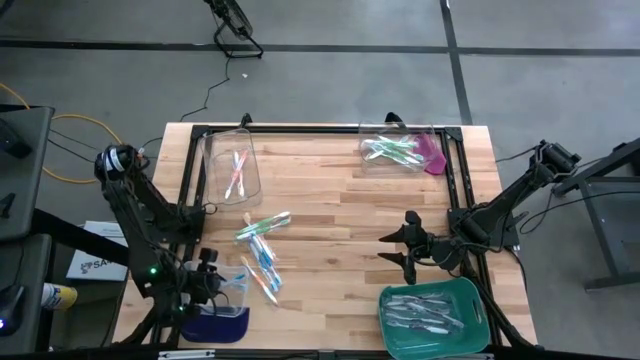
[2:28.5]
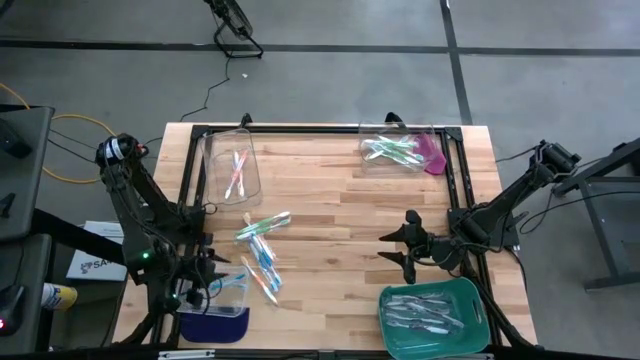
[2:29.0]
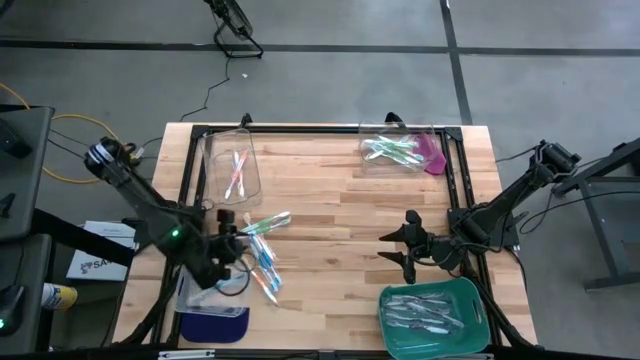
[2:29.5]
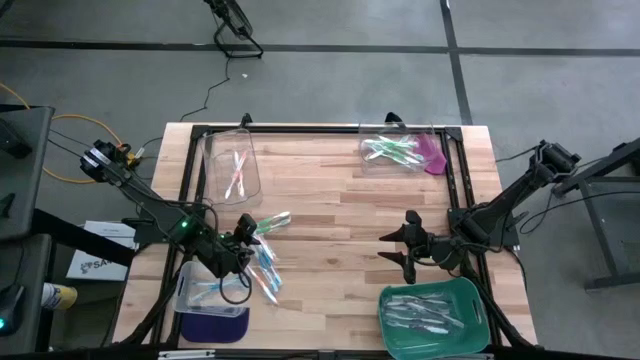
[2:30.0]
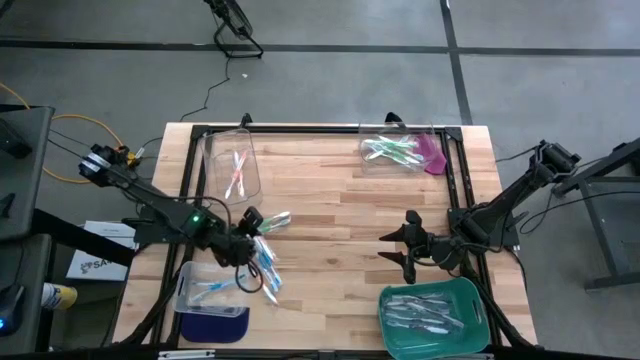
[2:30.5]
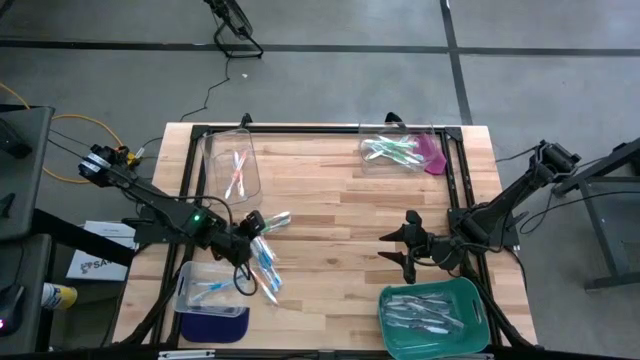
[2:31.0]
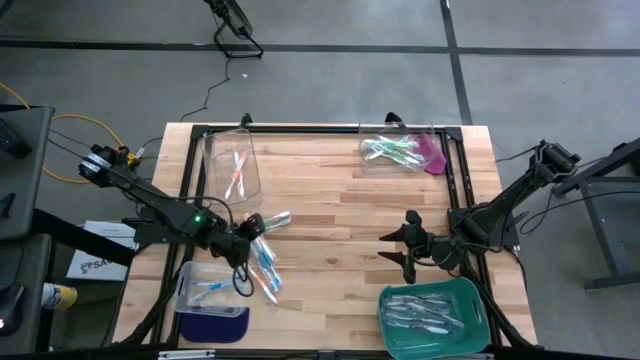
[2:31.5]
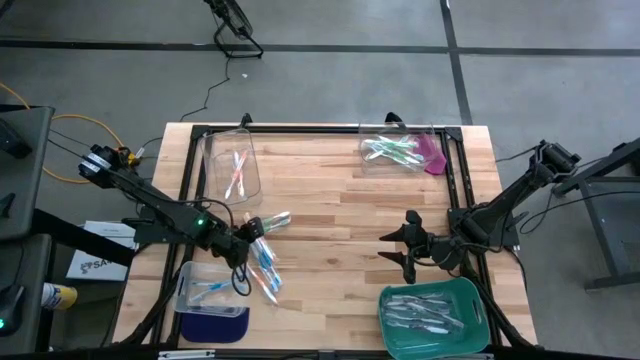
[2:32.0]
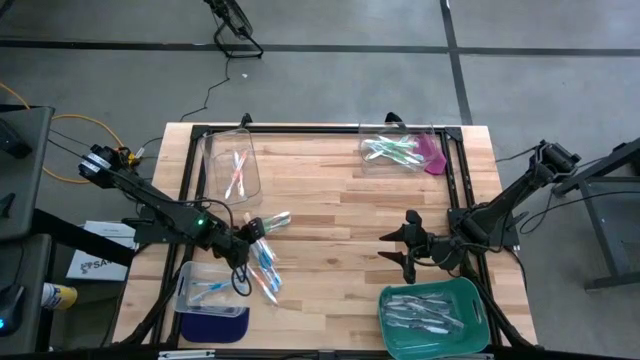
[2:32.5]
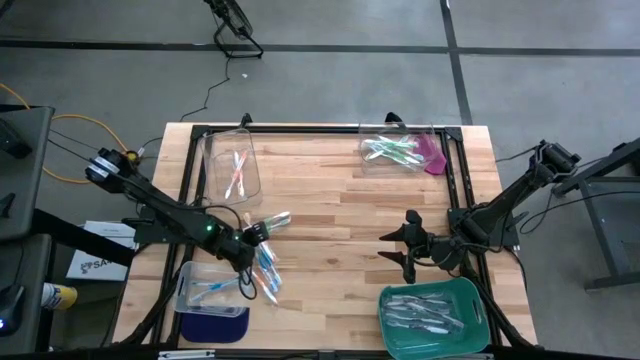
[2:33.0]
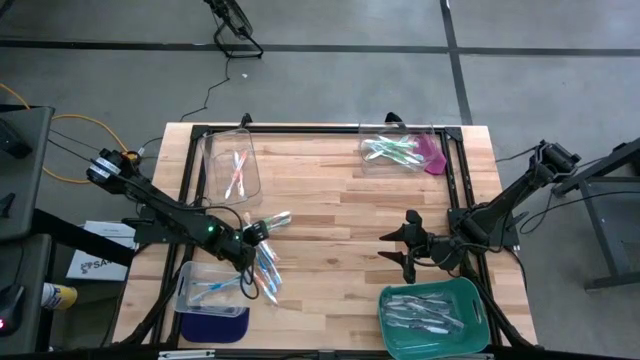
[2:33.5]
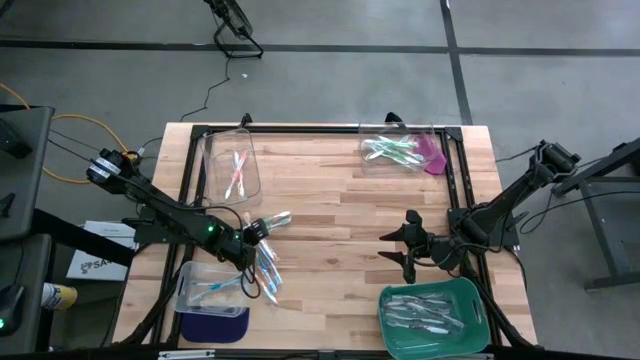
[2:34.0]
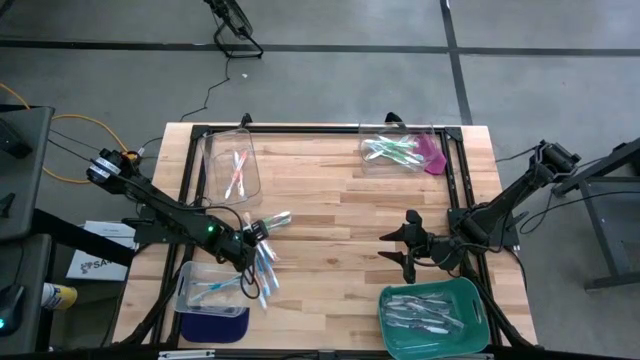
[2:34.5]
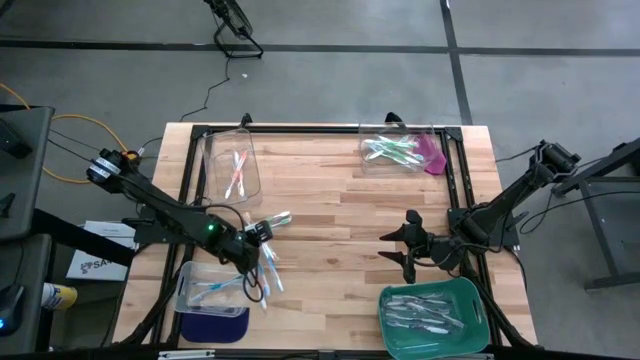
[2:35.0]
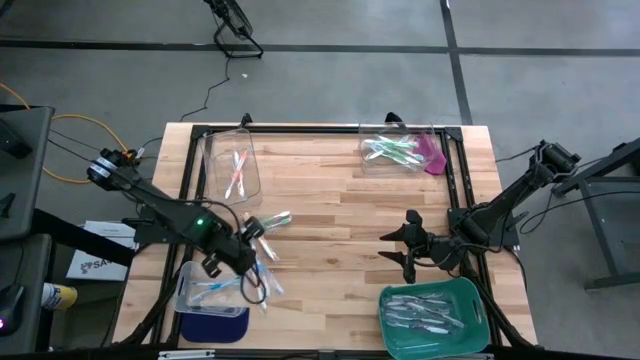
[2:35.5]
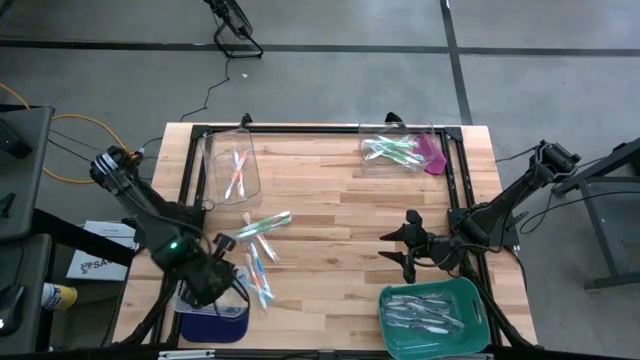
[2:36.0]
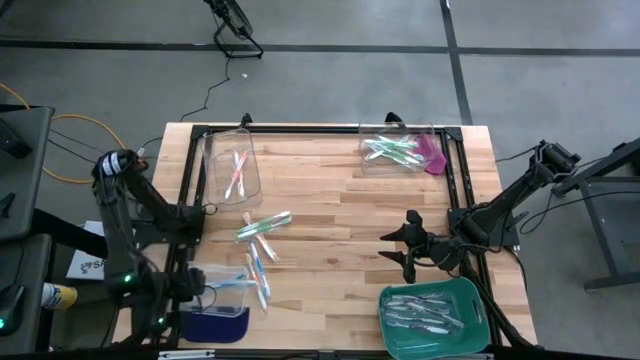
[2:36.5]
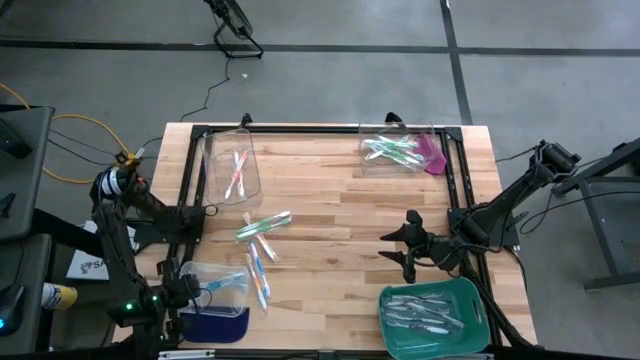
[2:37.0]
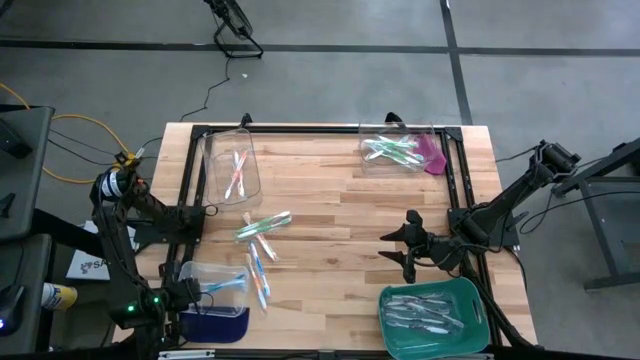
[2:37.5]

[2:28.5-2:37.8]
Task: Pick & Place Toothbrushes
Put the blue toothbrush into the bottom transparent bin

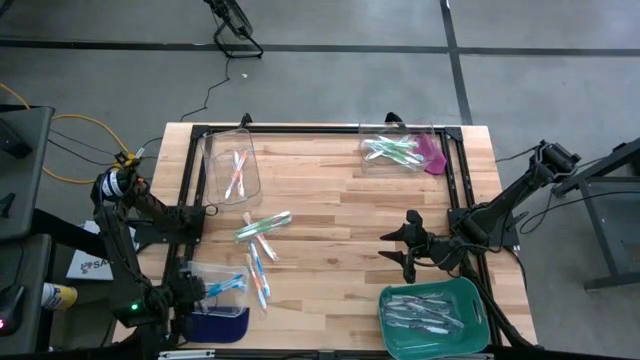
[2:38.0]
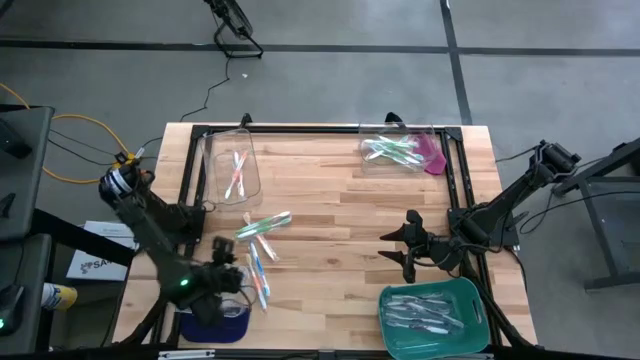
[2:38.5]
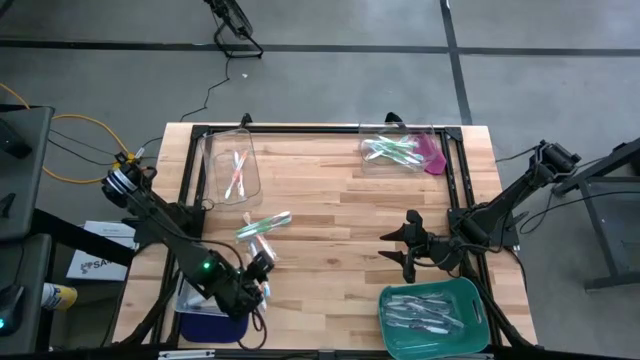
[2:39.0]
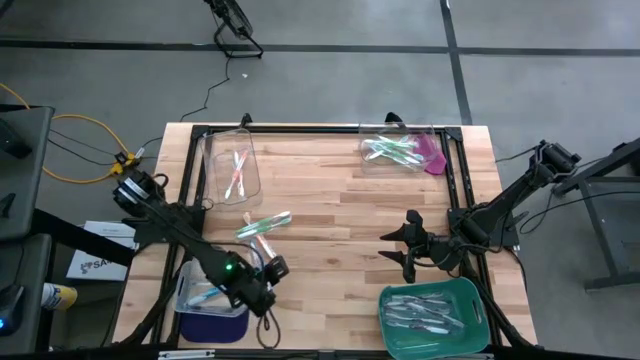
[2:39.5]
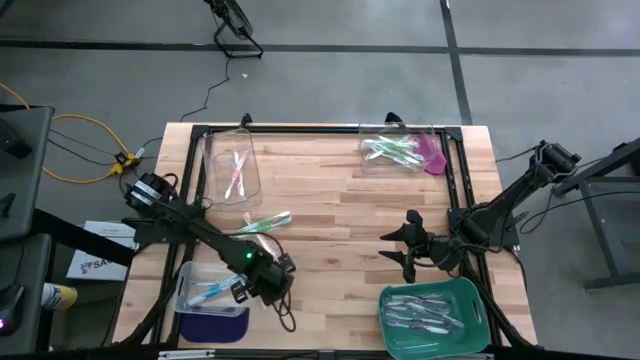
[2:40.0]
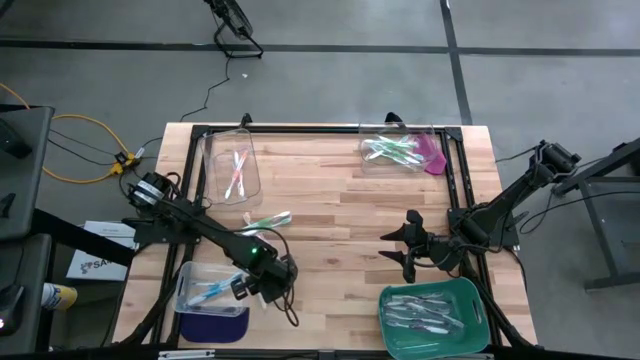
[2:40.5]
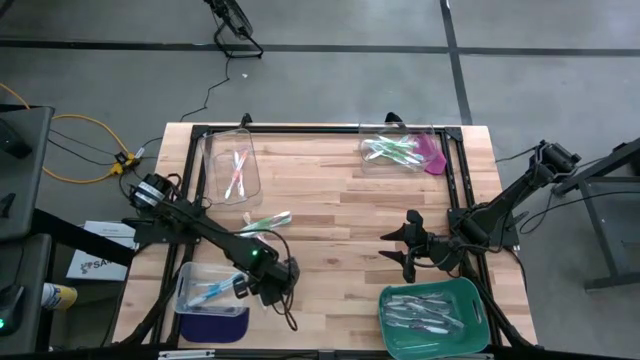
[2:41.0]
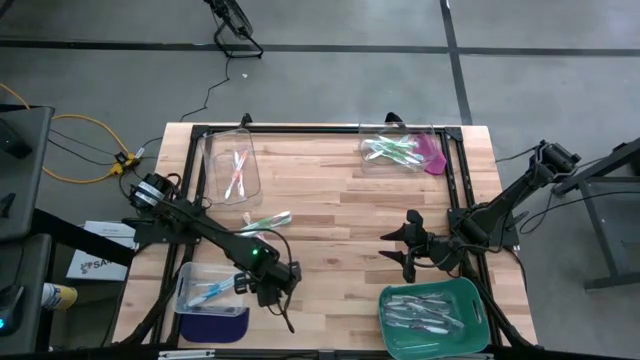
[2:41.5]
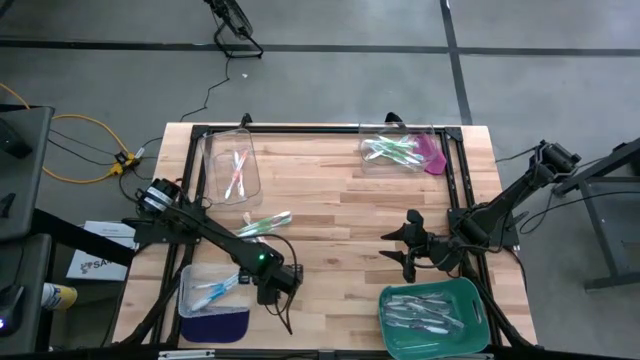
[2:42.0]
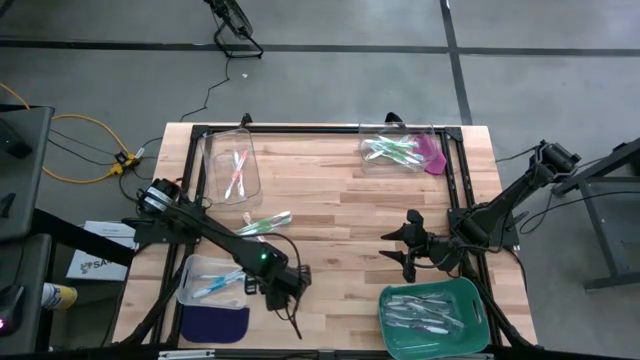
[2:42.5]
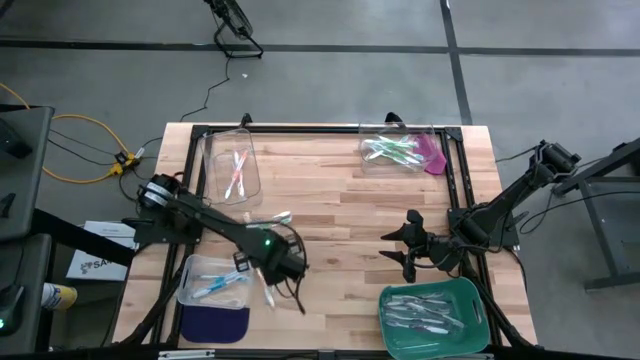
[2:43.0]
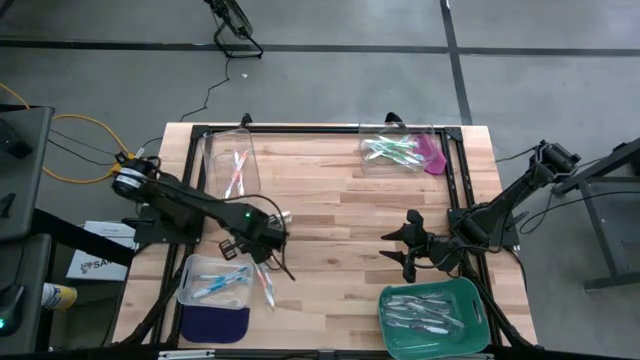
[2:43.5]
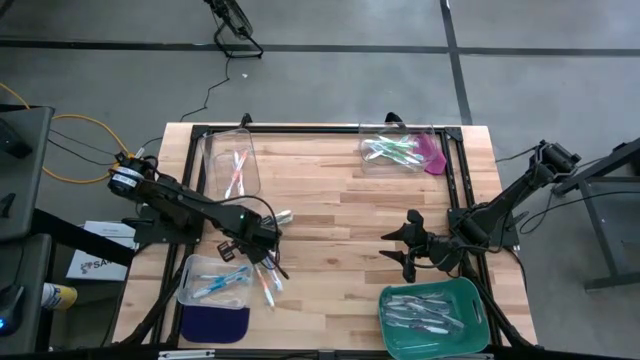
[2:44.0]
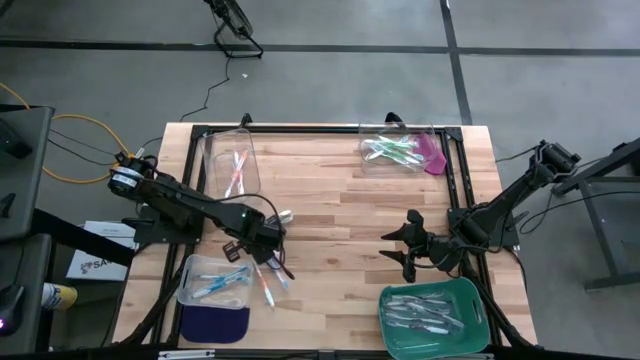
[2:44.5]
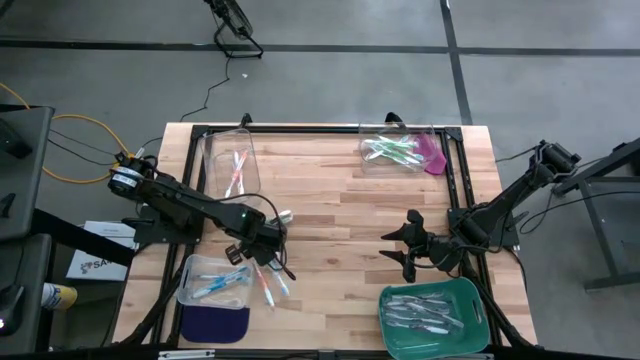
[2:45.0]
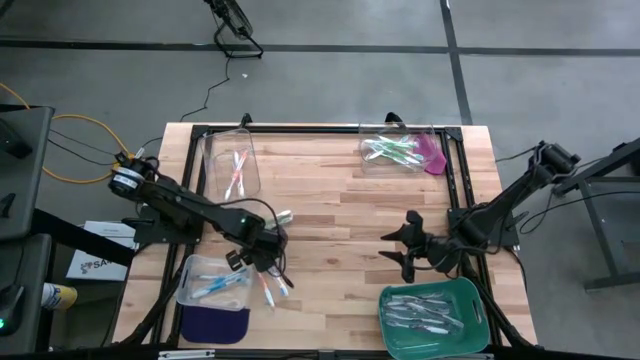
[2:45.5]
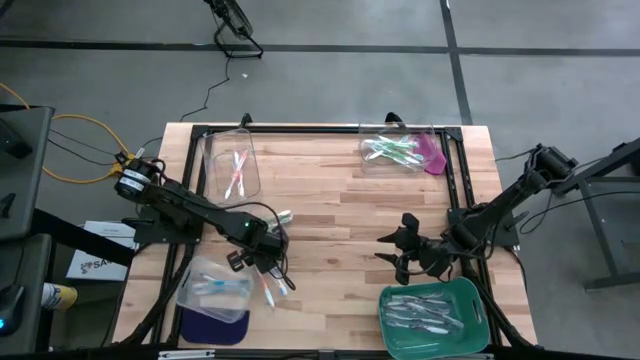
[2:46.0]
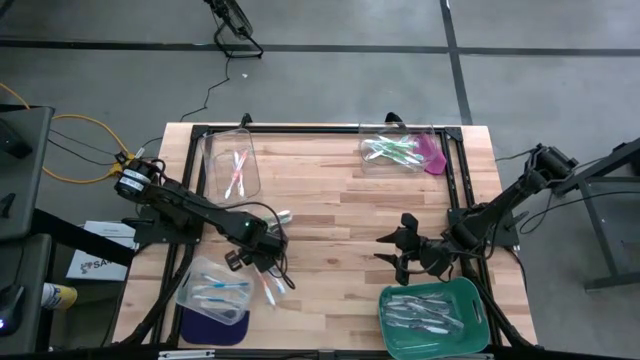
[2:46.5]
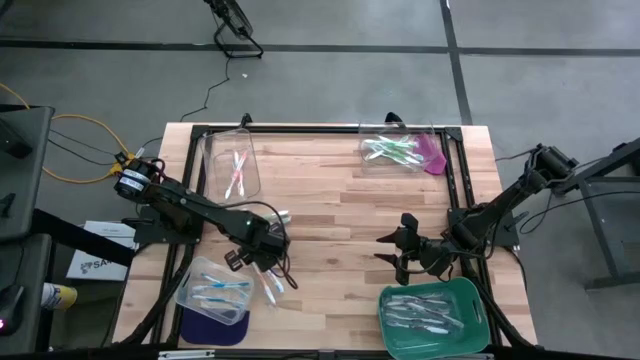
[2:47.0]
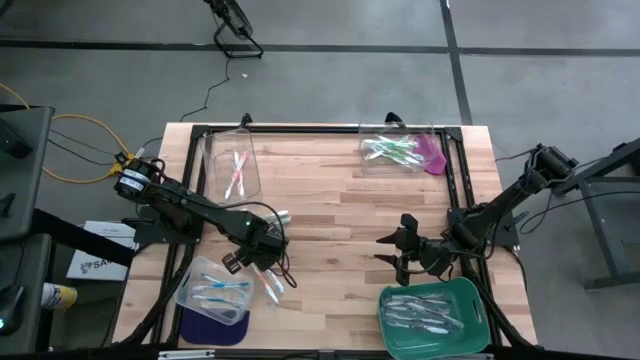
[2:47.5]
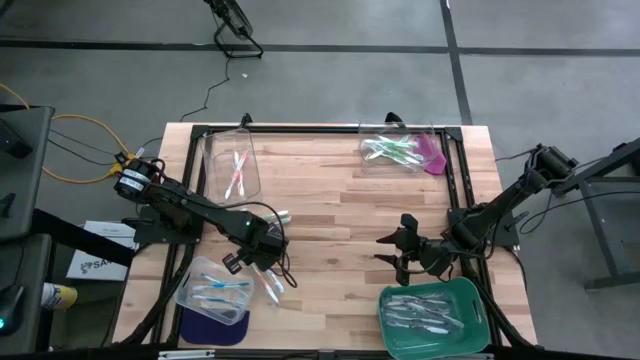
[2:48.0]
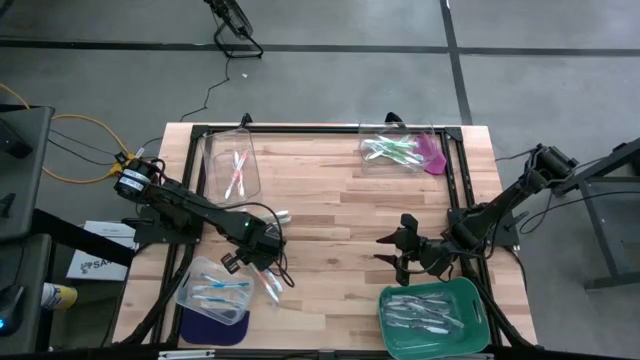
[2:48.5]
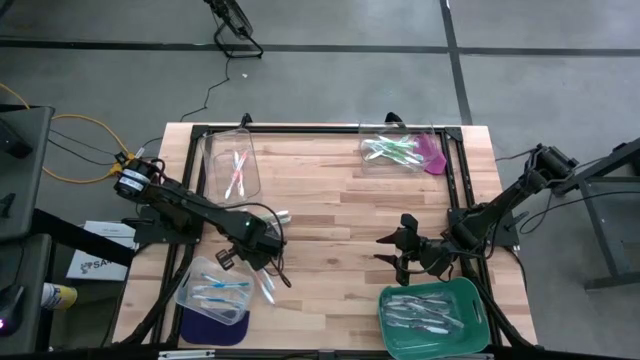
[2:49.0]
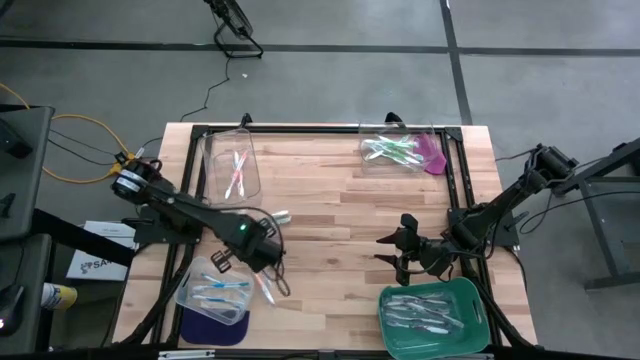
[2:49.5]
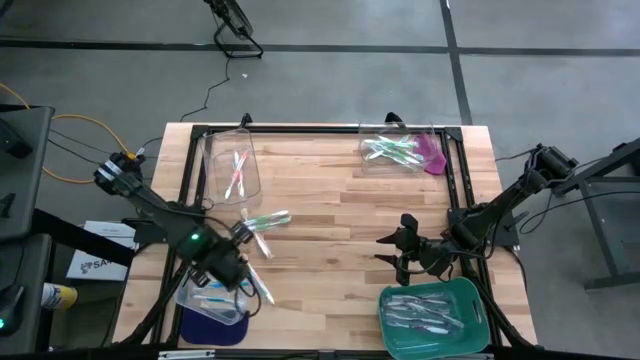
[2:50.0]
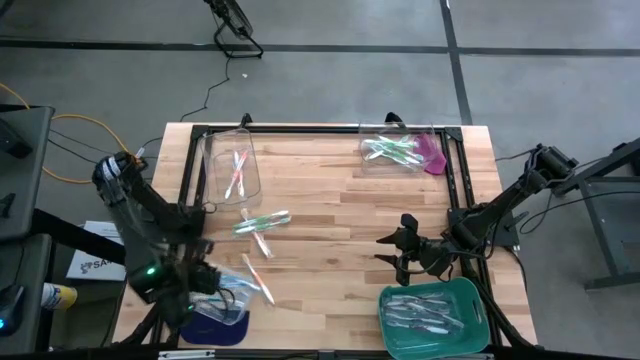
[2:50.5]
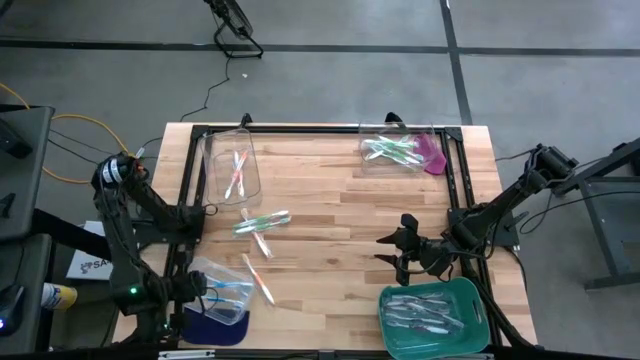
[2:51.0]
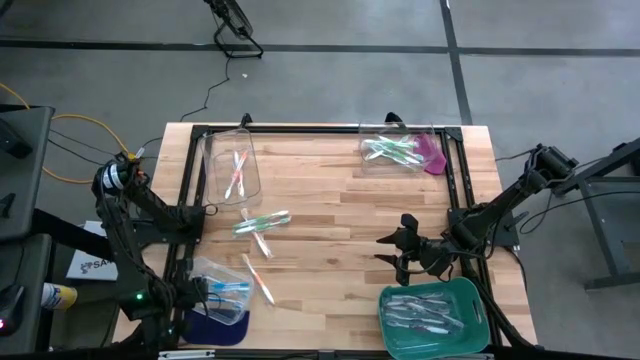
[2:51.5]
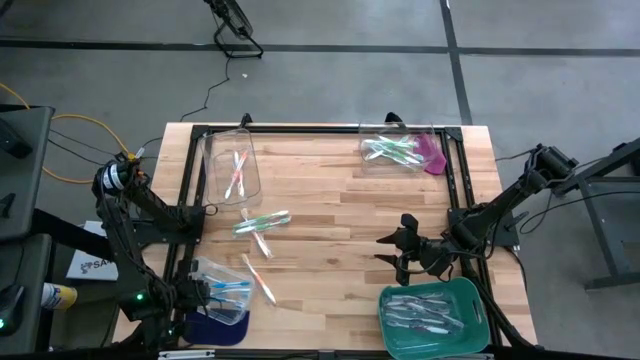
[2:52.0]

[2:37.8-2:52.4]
Put the blue toothbrush into the bottom transparent bin
